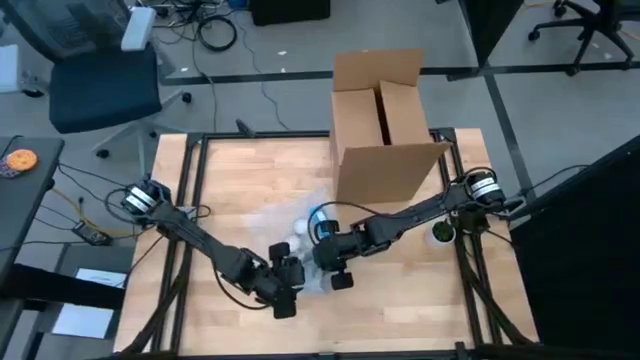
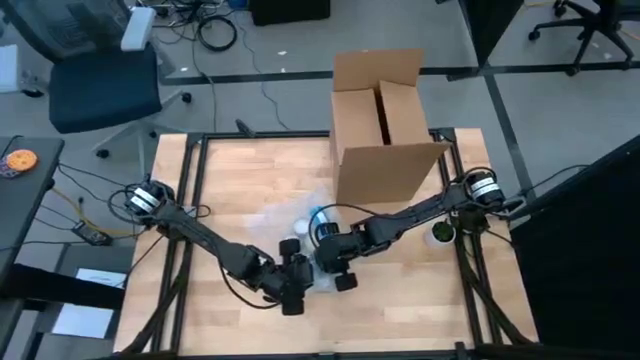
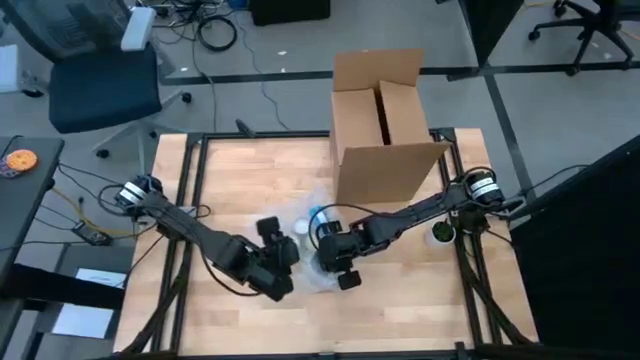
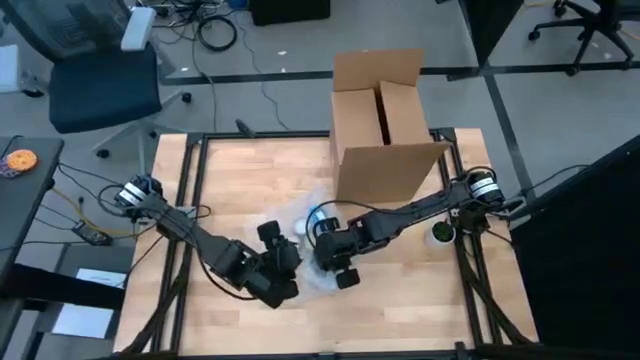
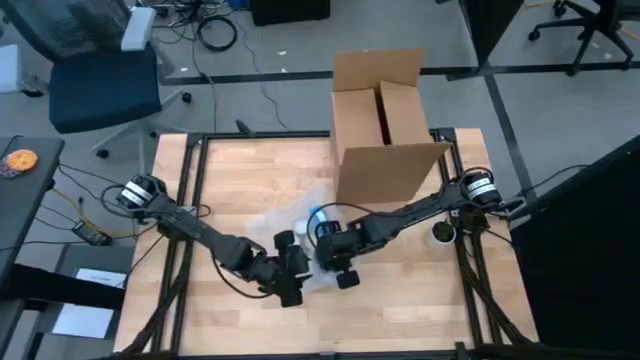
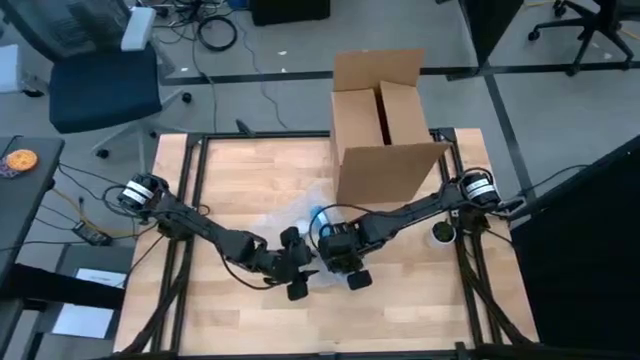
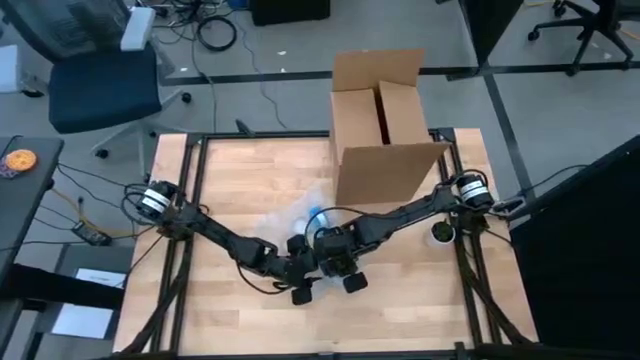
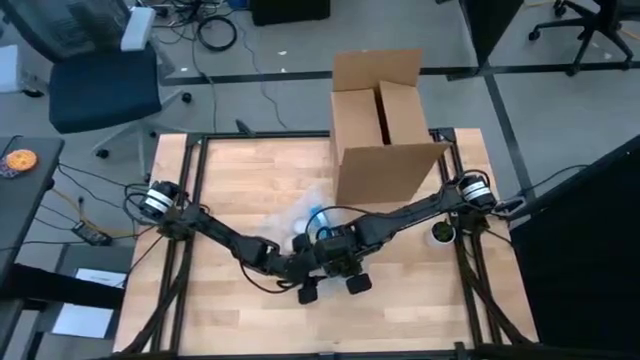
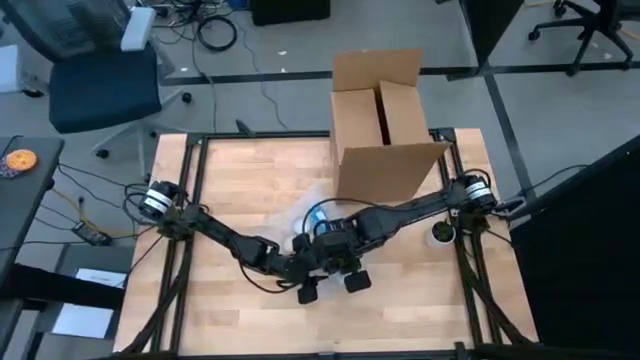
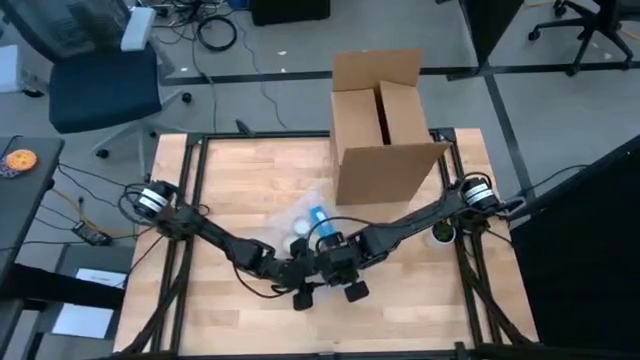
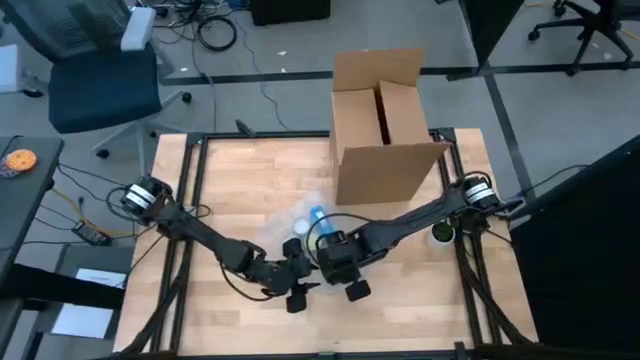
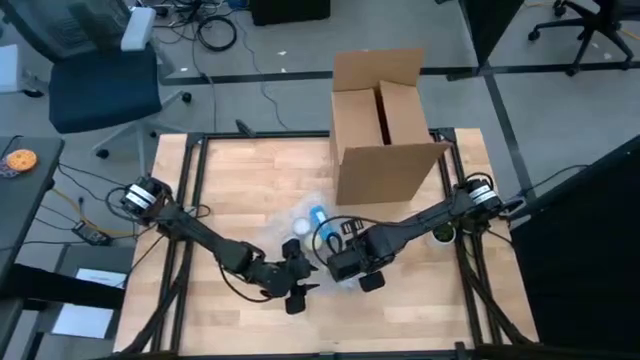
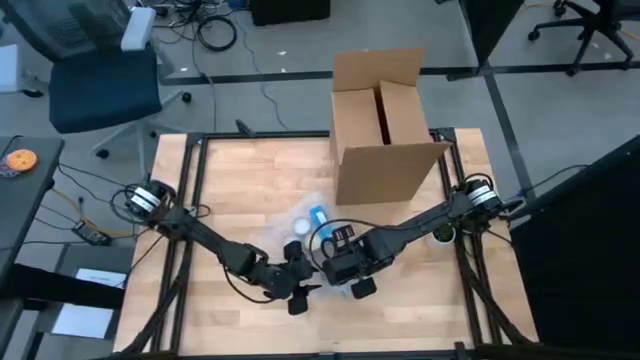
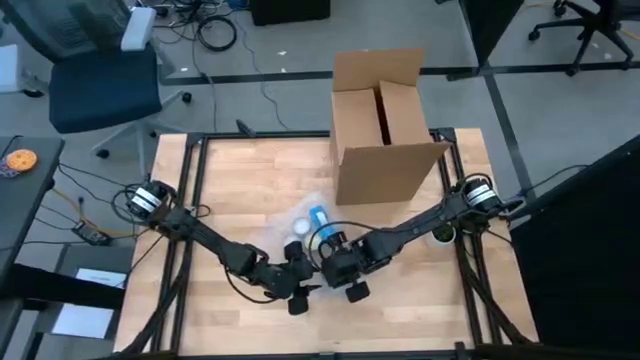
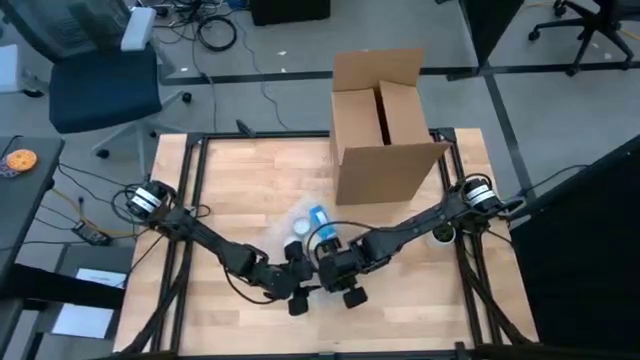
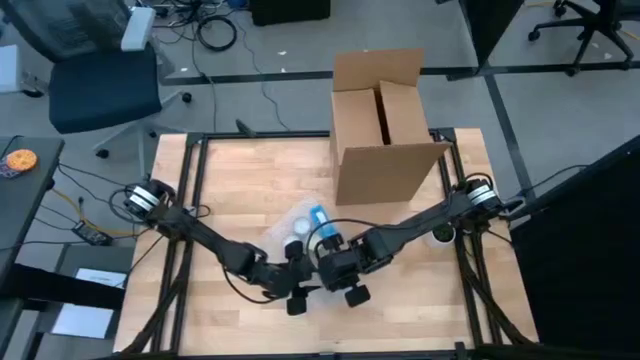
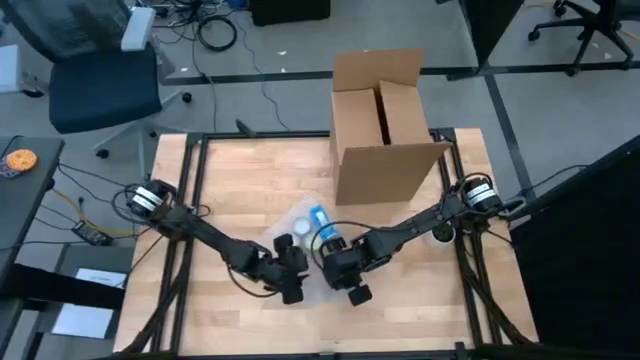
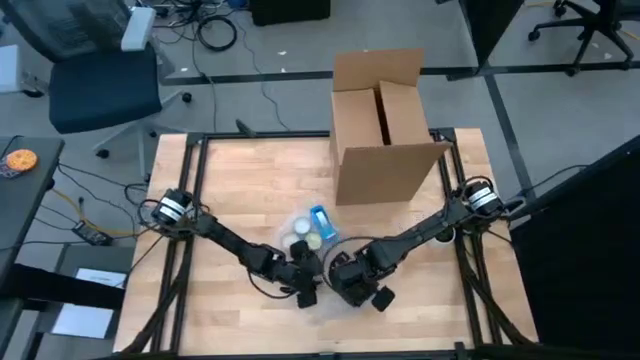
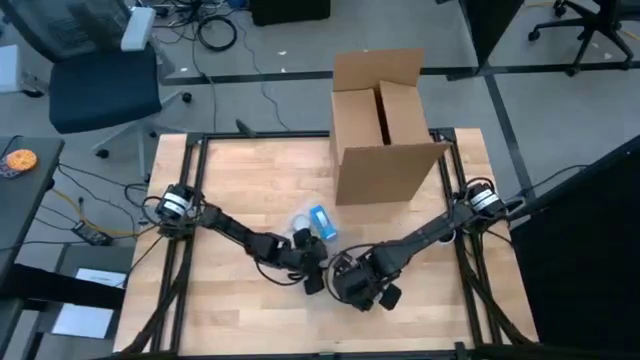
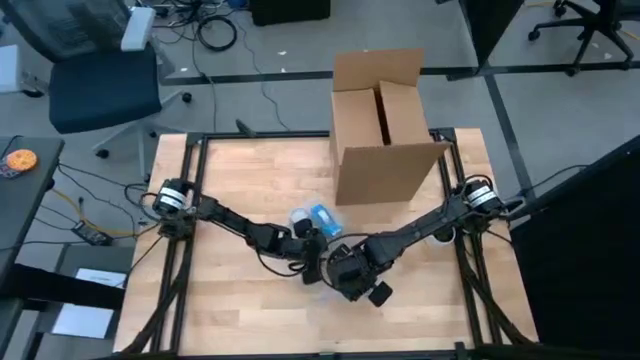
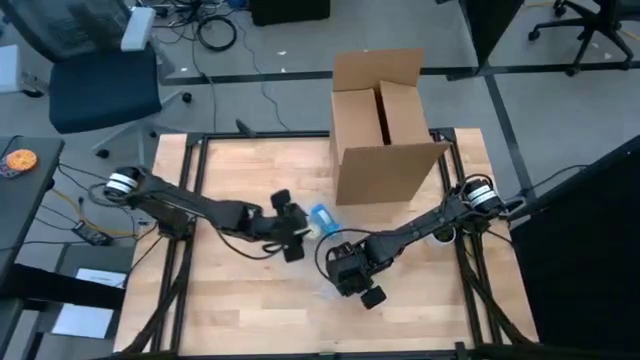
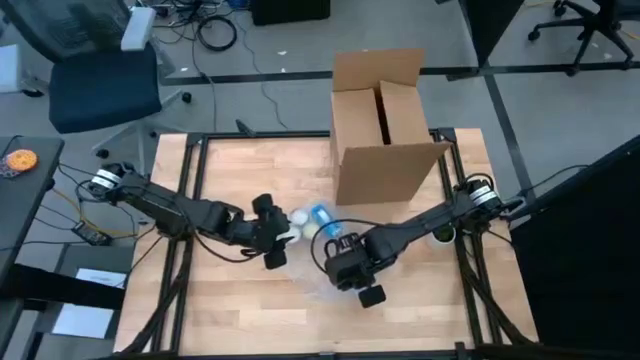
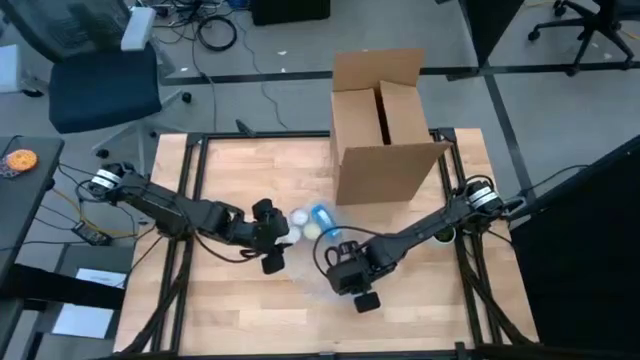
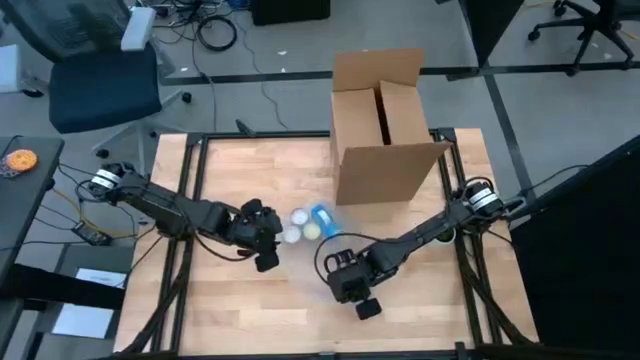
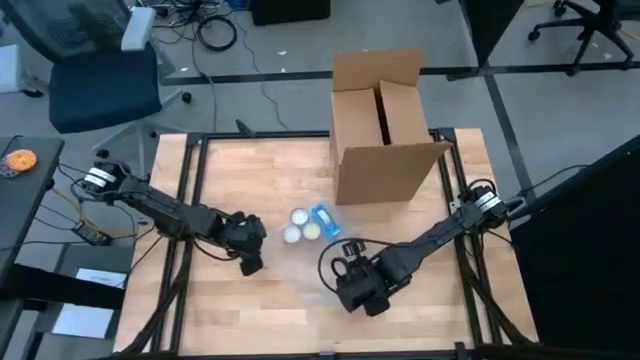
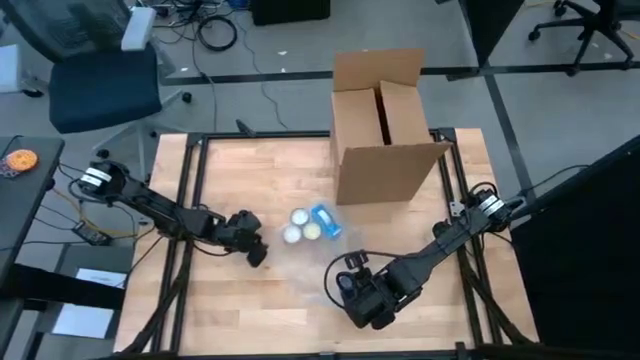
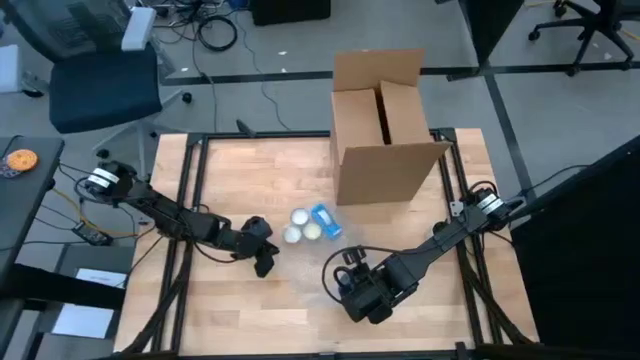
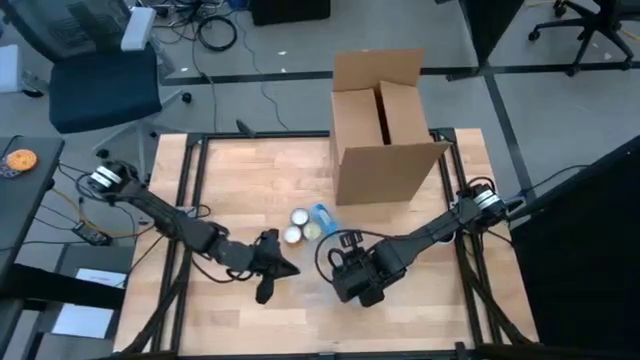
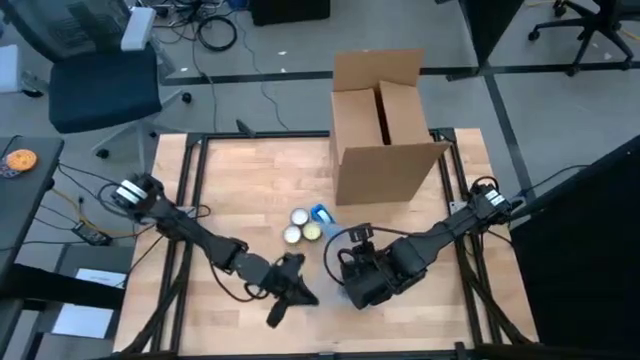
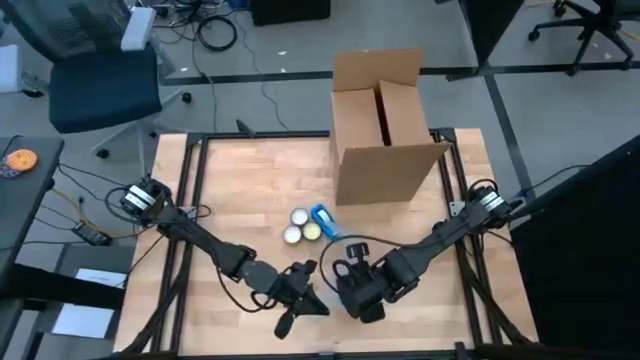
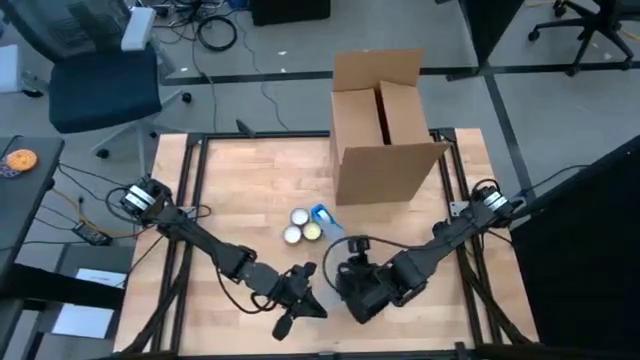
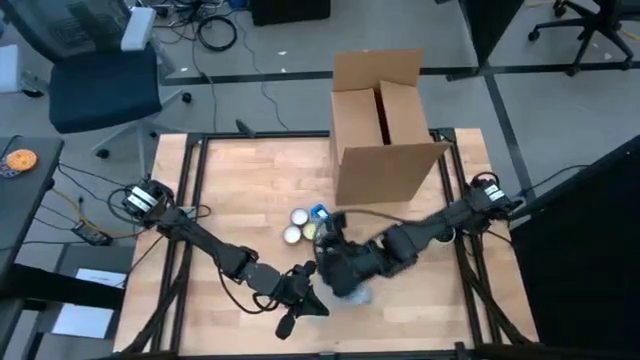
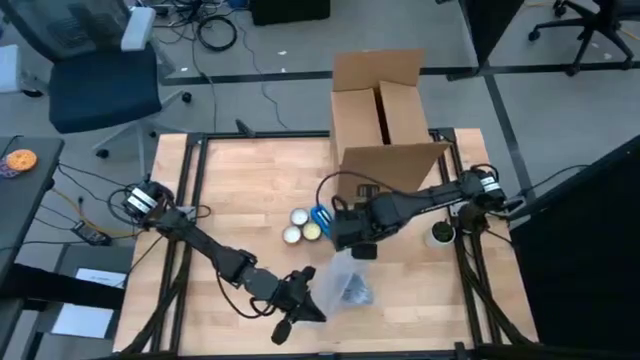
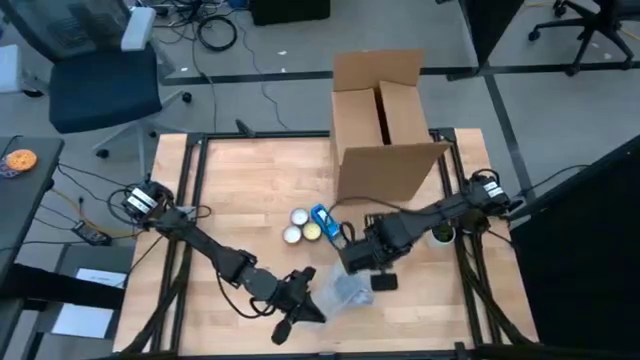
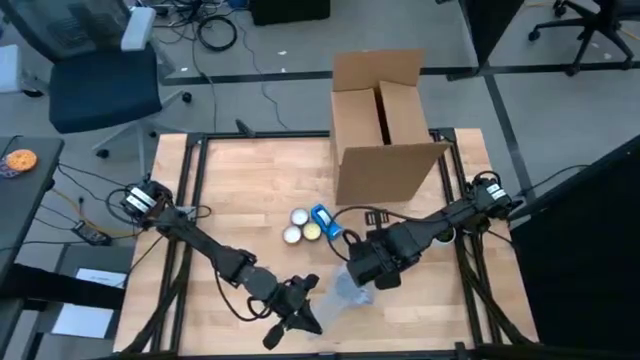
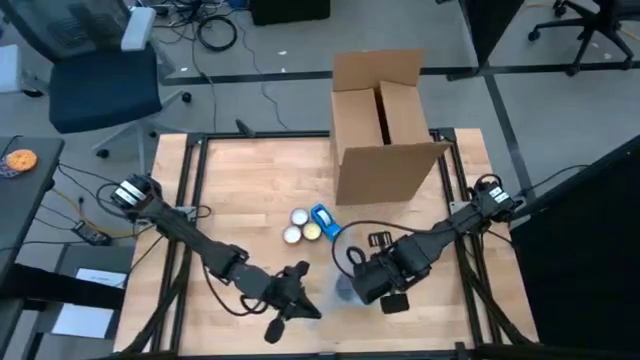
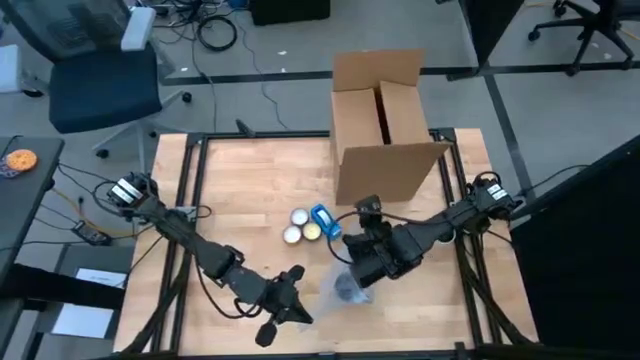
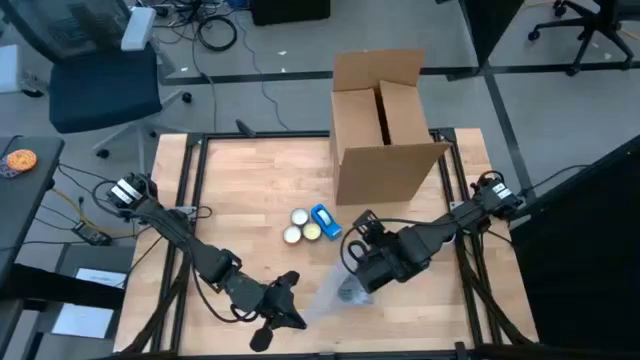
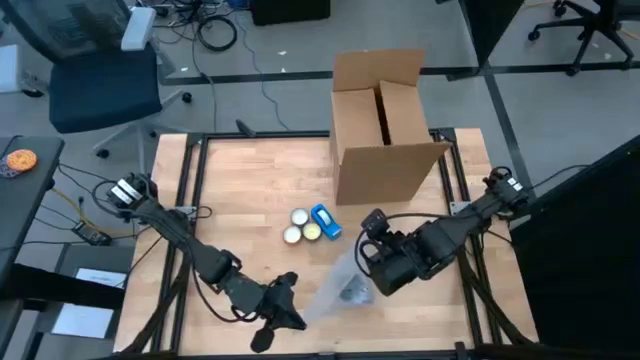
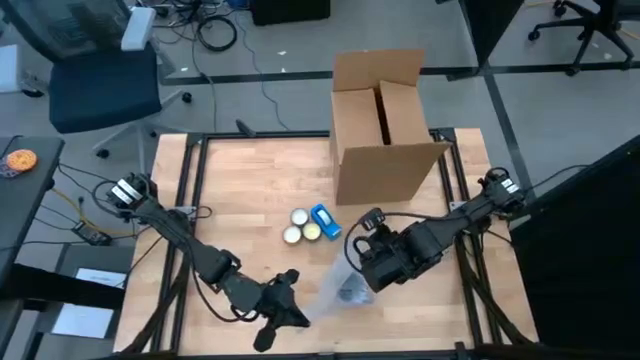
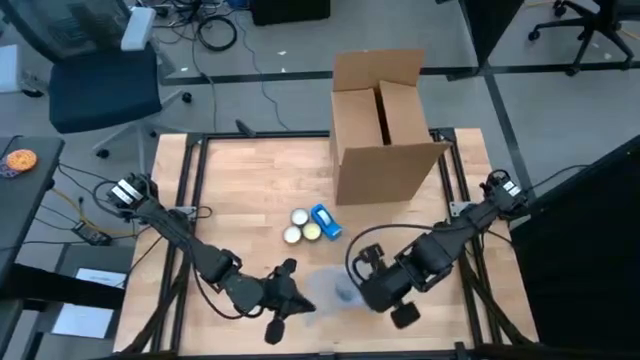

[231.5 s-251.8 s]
Task: wrap mug
Wrap the purple mug with the transparent bubble wrap
